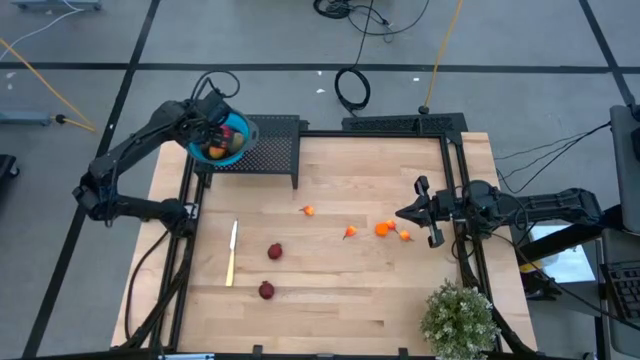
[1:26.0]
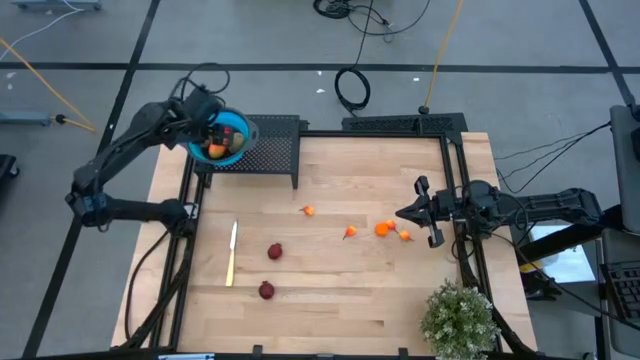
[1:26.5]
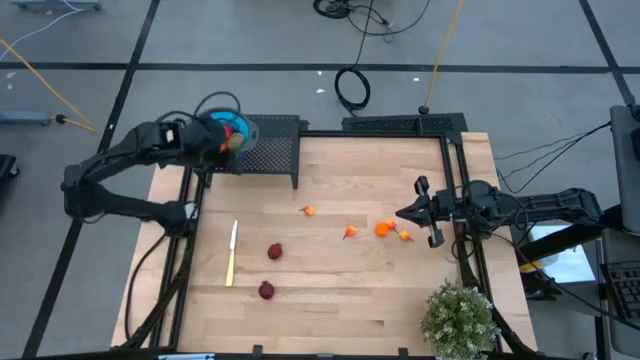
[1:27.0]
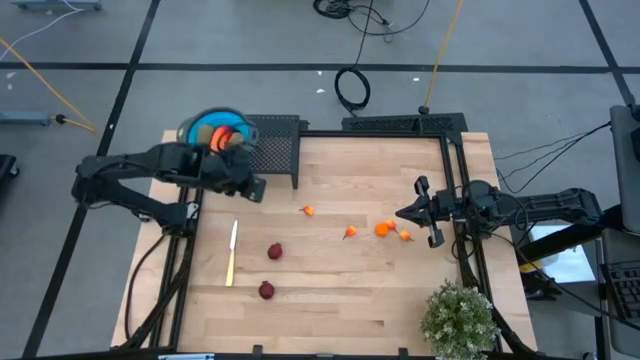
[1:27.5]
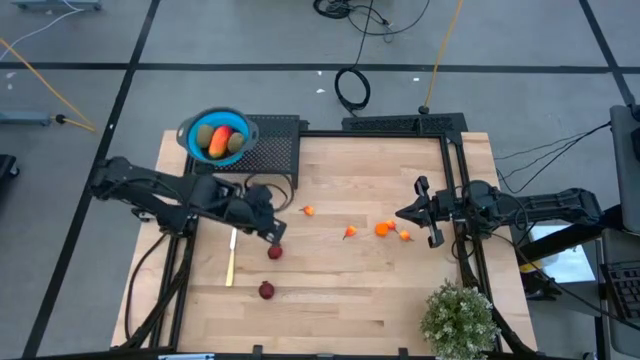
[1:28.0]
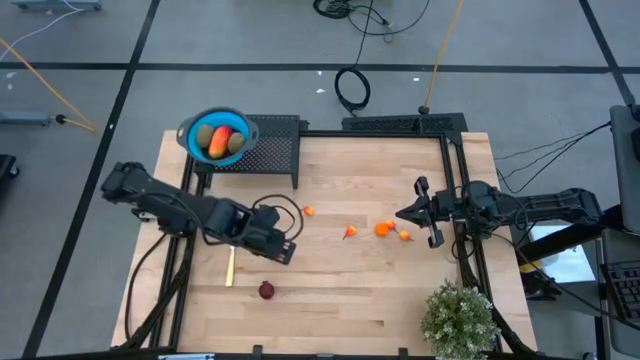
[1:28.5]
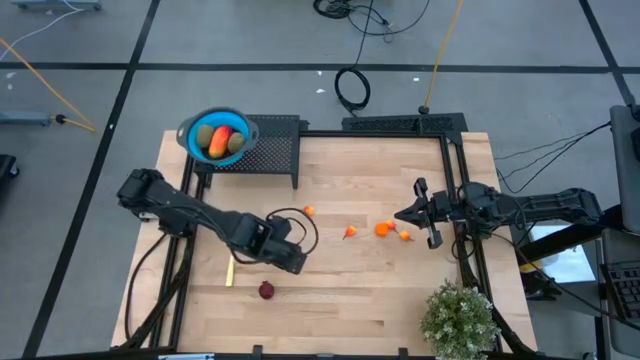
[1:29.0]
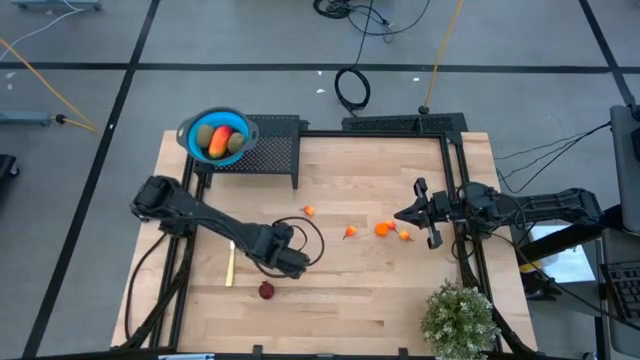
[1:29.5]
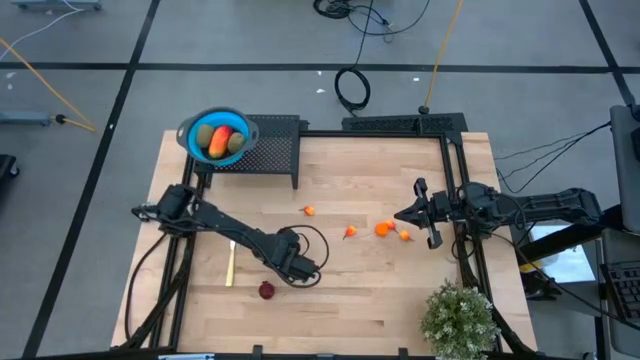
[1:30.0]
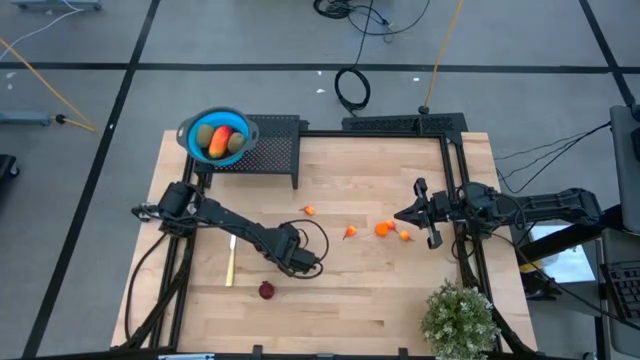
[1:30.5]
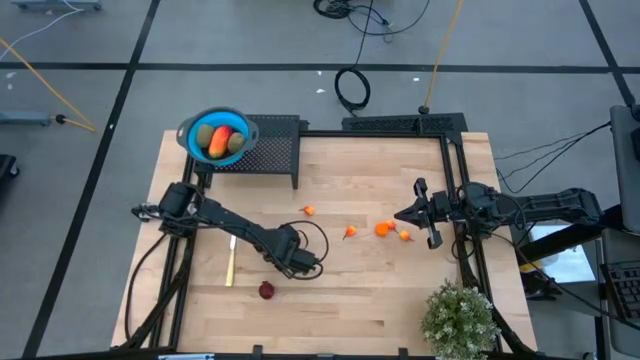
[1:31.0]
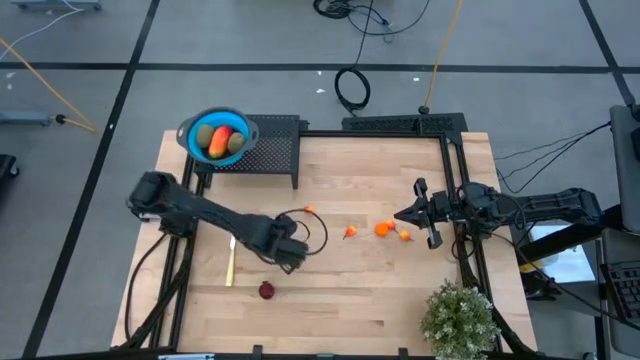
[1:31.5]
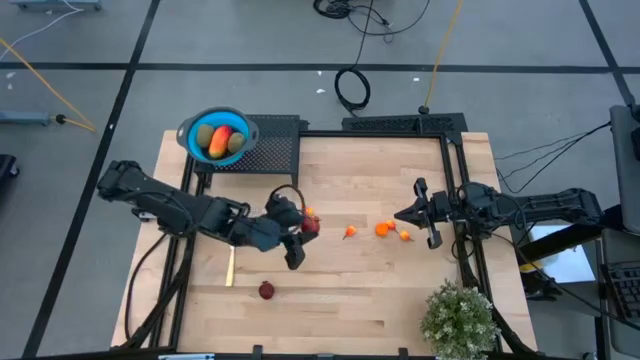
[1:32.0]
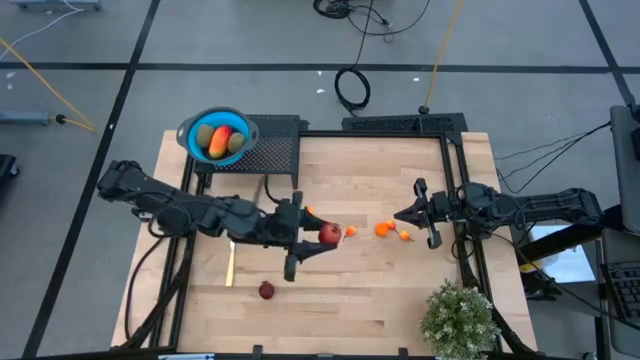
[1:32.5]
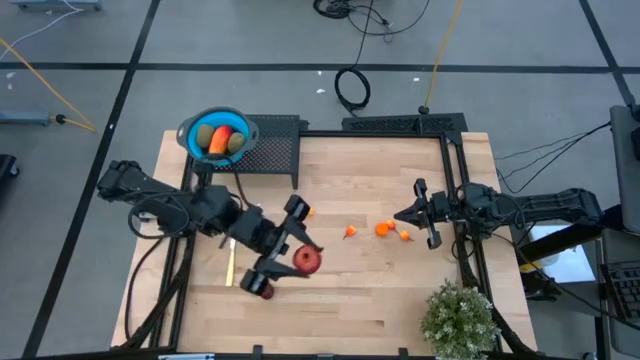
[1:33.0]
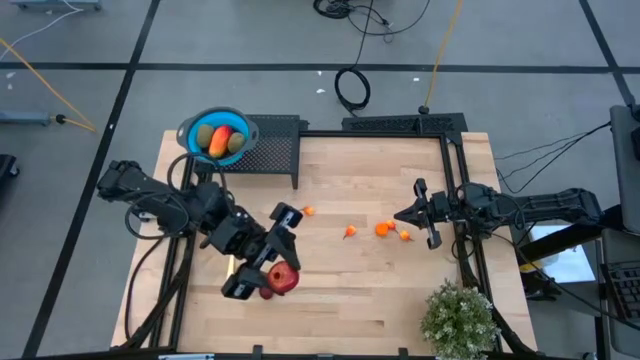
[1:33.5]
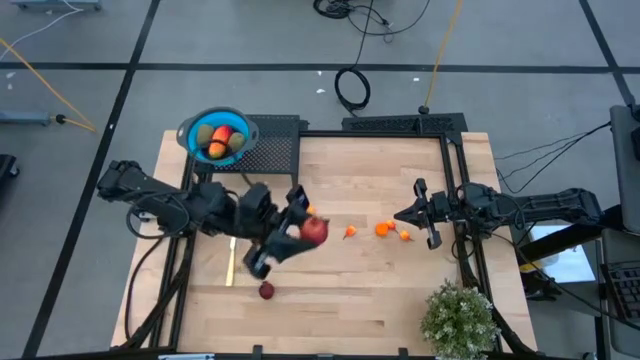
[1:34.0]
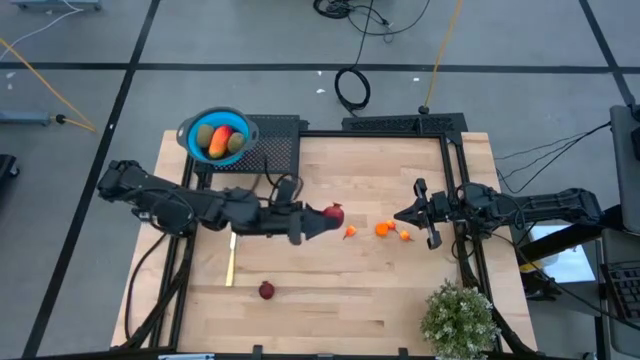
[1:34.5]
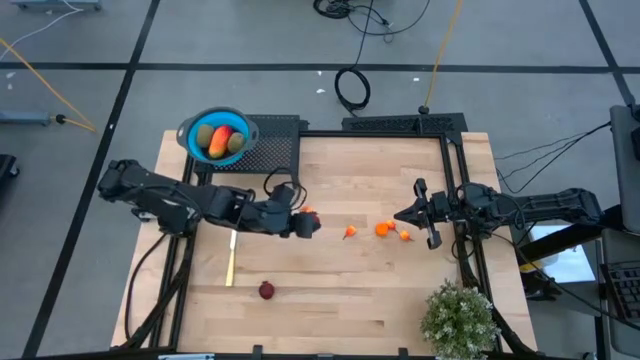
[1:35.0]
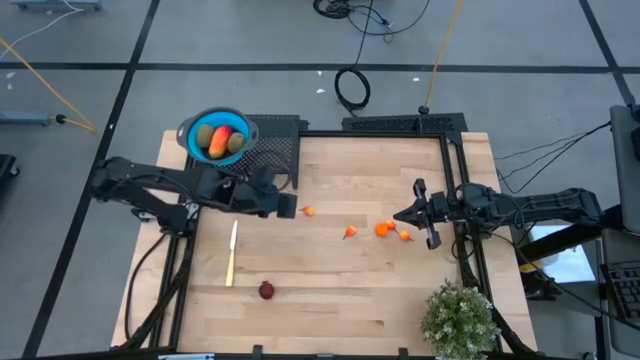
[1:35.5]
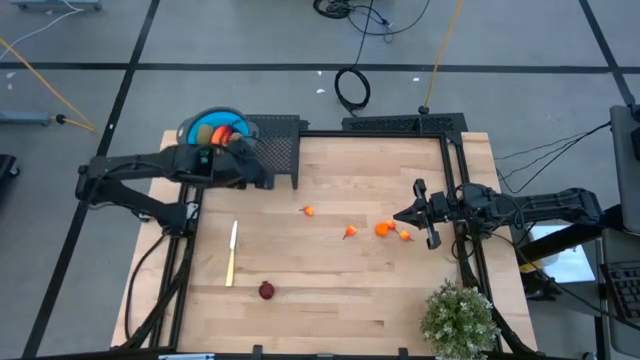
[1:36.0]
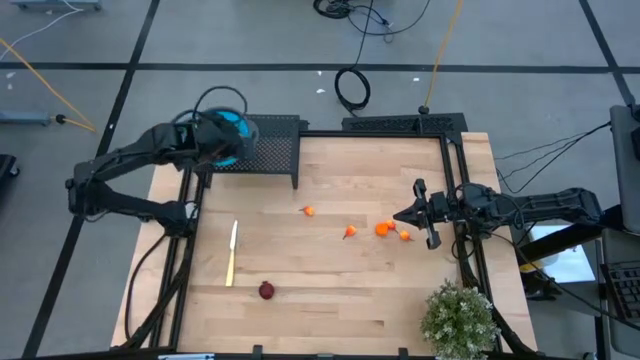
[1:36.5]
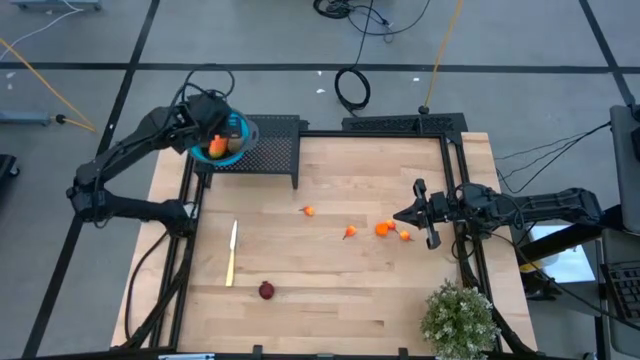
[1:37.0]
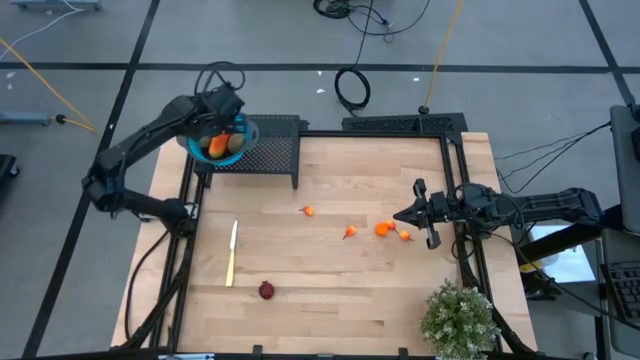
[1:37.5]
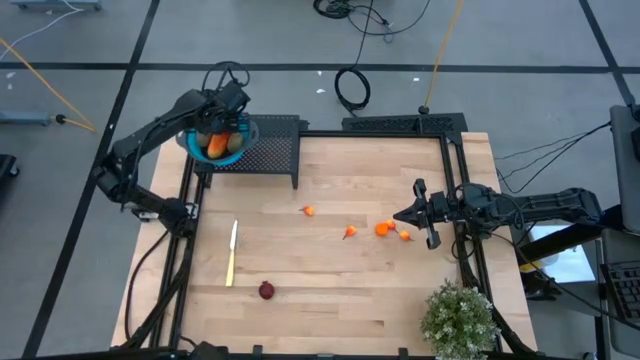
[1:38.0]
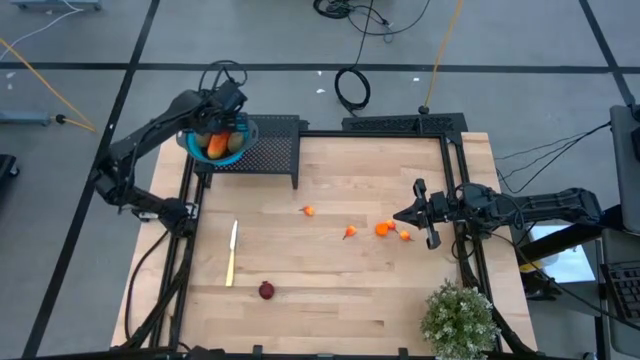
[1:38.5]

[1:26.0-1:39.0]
Task: Pick & Place Fruit
Put the pomegranate into the blue strainer bowl on the shelf
